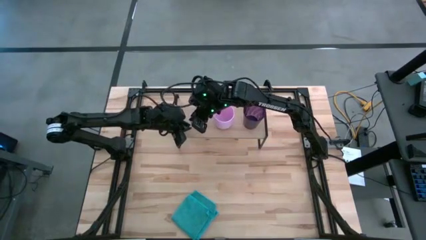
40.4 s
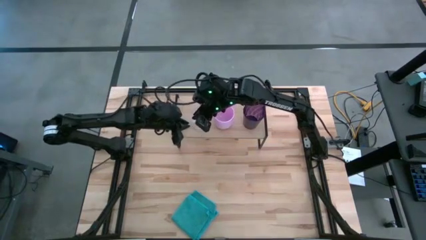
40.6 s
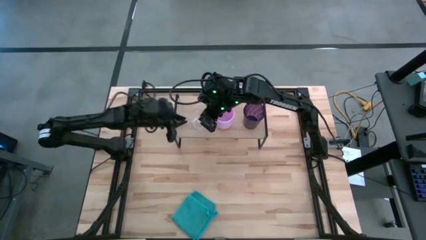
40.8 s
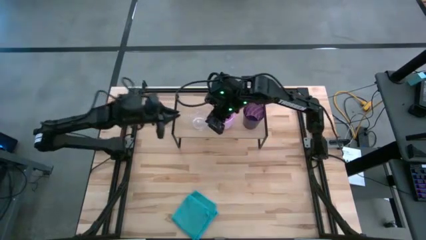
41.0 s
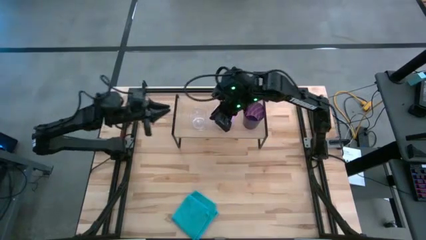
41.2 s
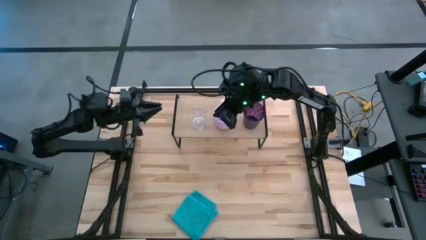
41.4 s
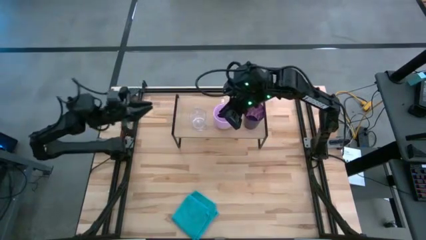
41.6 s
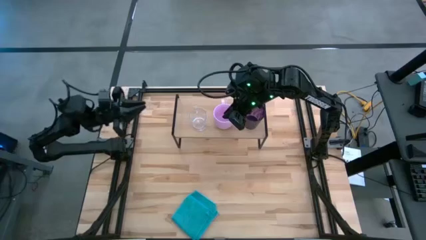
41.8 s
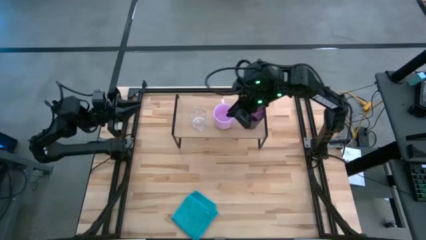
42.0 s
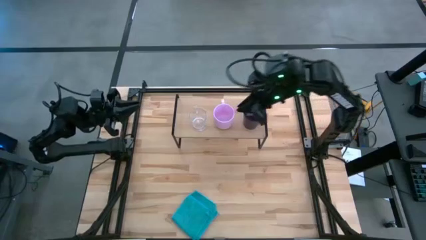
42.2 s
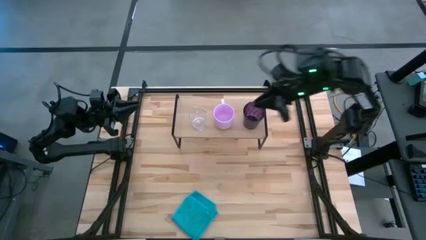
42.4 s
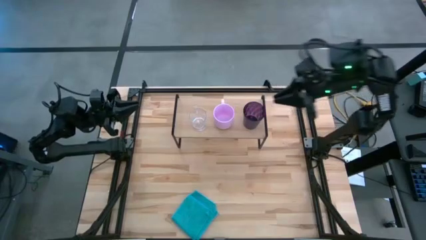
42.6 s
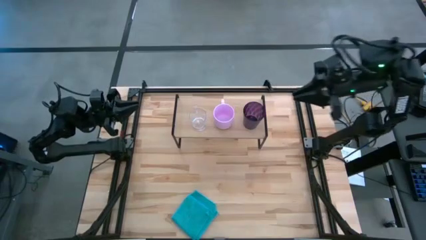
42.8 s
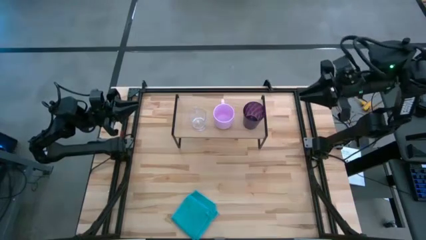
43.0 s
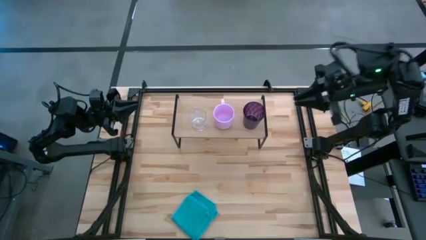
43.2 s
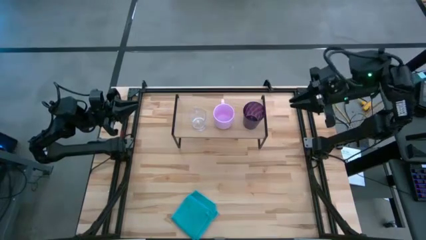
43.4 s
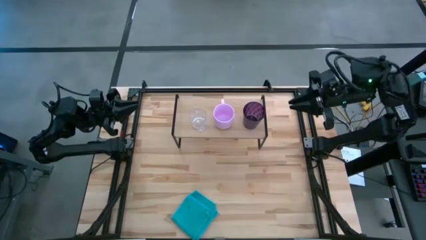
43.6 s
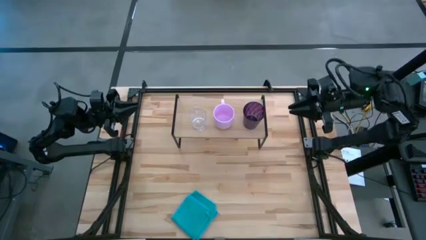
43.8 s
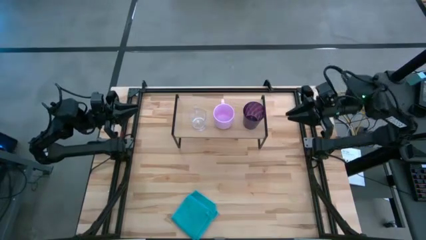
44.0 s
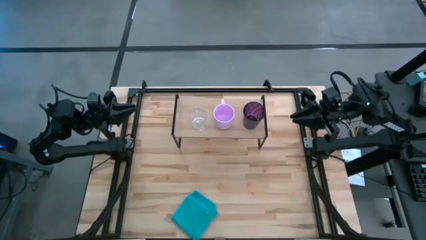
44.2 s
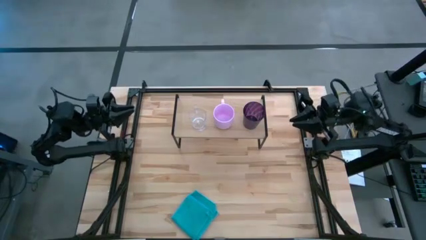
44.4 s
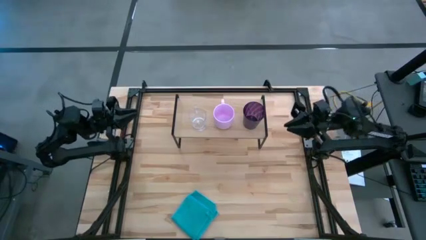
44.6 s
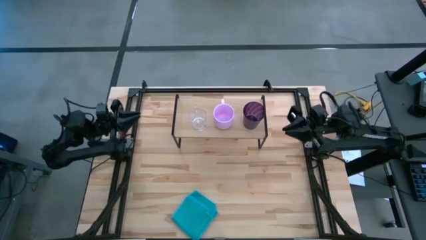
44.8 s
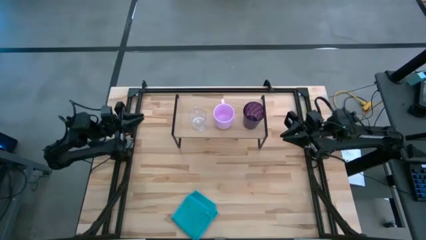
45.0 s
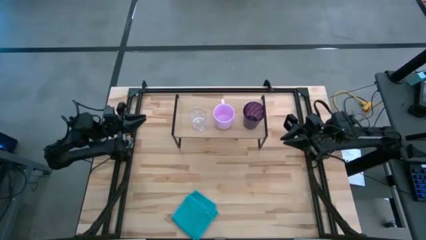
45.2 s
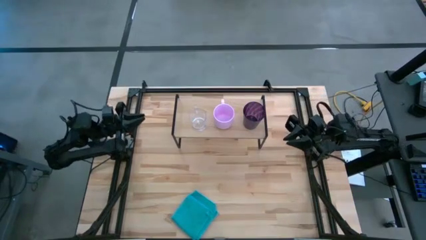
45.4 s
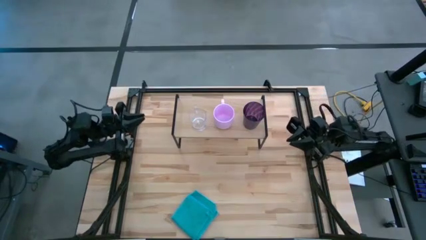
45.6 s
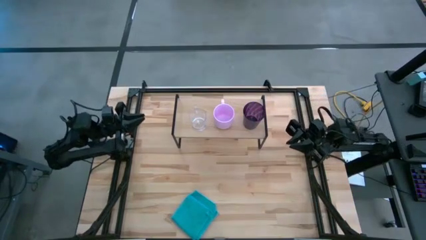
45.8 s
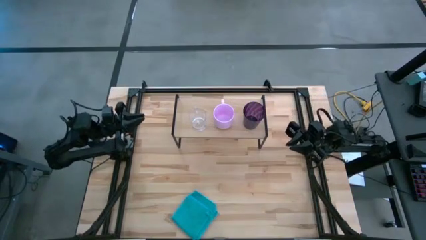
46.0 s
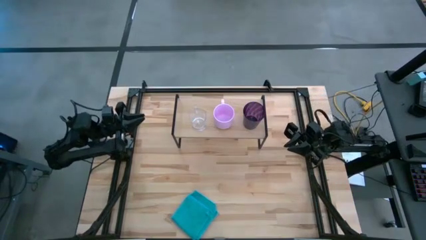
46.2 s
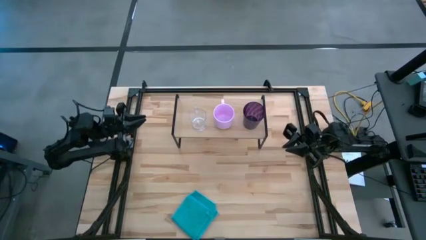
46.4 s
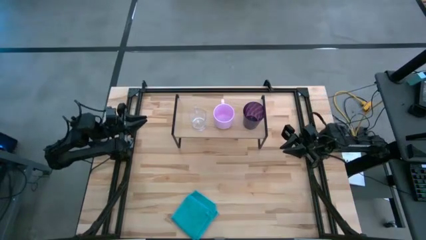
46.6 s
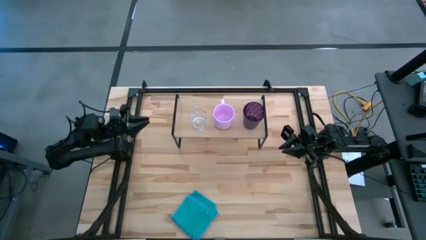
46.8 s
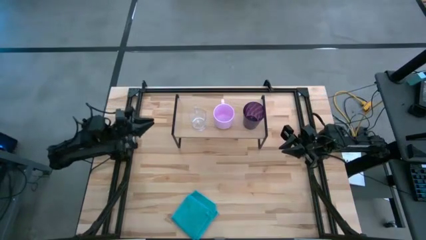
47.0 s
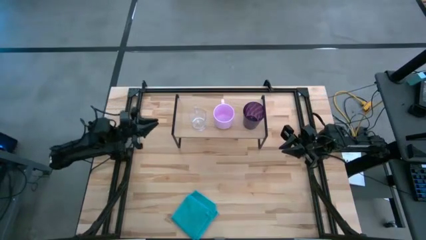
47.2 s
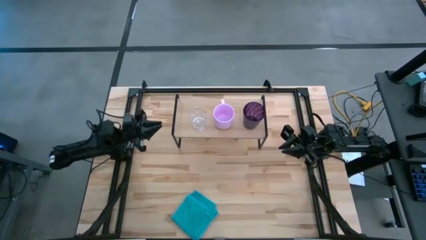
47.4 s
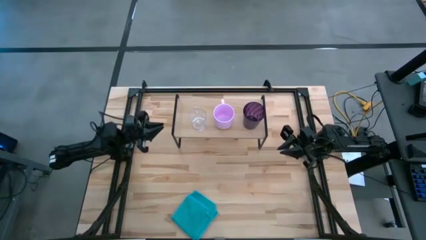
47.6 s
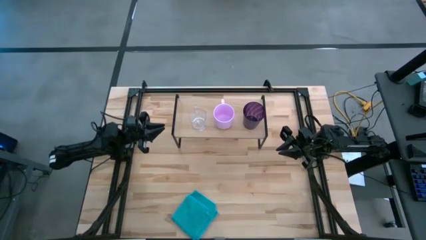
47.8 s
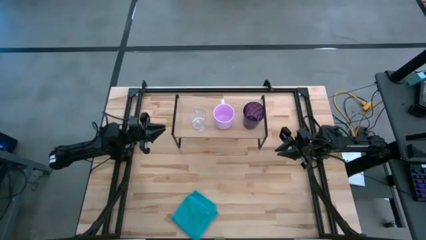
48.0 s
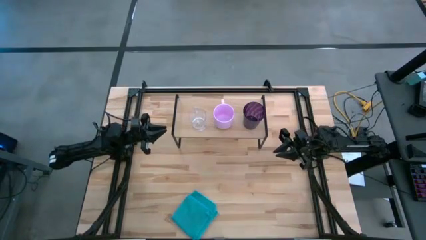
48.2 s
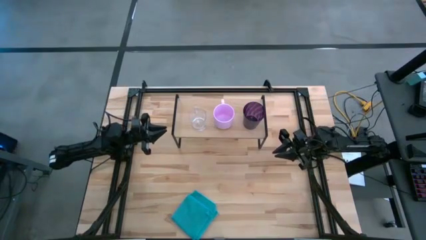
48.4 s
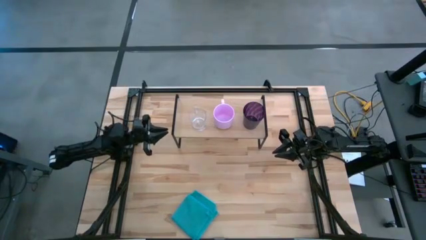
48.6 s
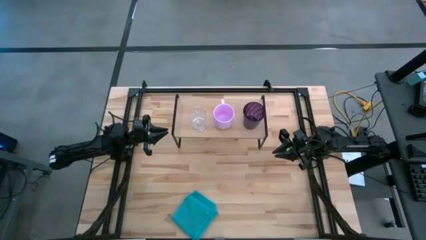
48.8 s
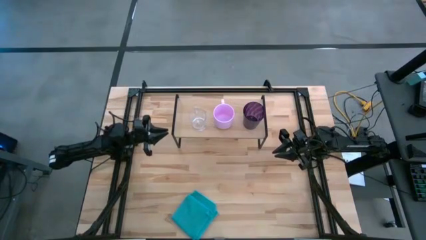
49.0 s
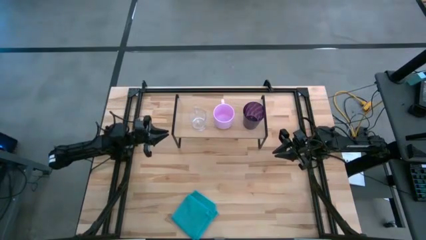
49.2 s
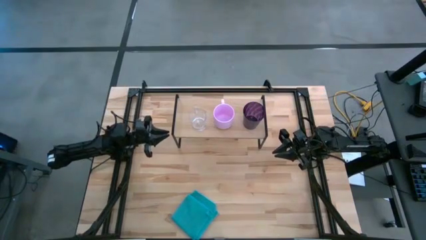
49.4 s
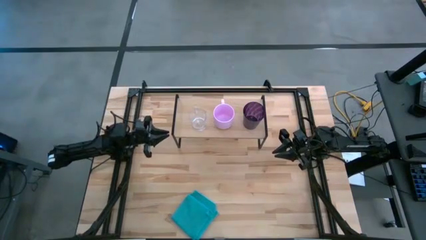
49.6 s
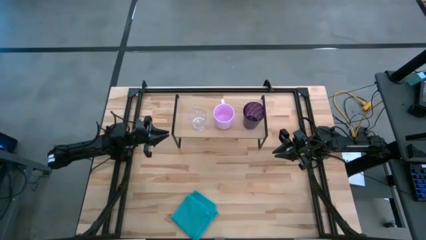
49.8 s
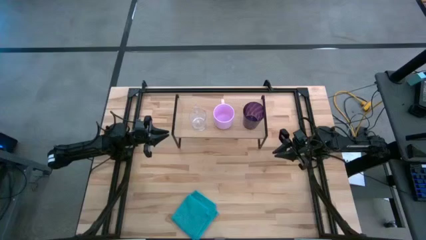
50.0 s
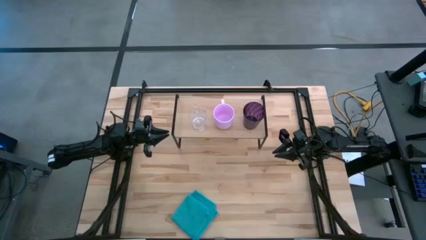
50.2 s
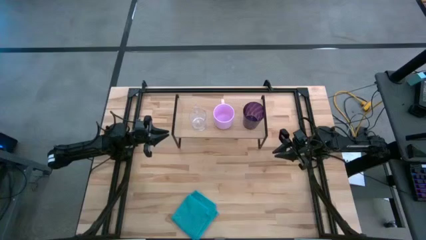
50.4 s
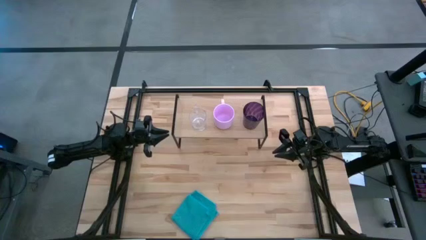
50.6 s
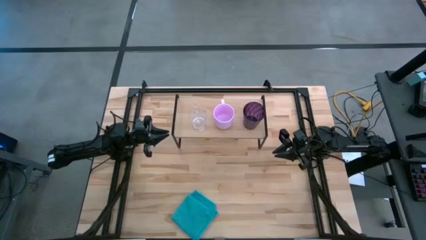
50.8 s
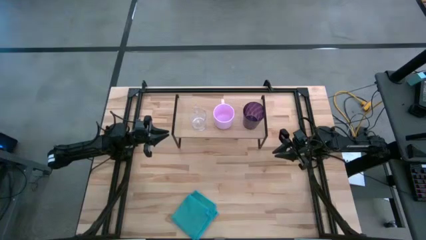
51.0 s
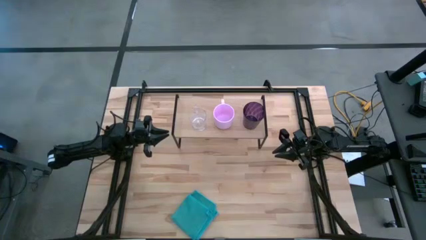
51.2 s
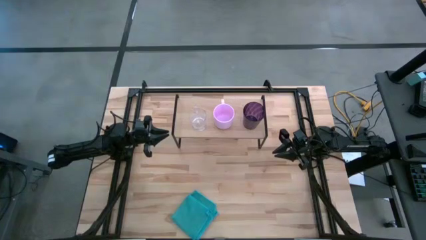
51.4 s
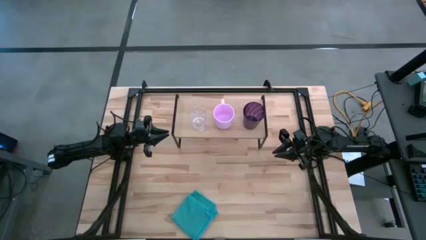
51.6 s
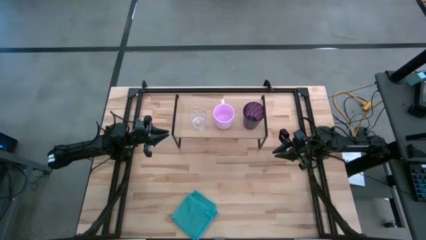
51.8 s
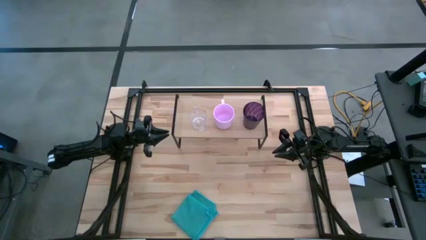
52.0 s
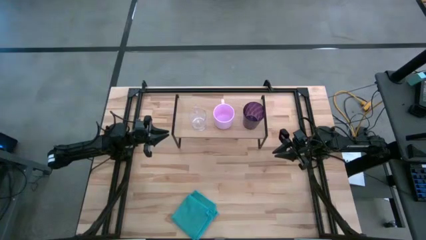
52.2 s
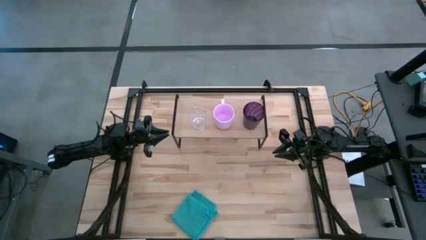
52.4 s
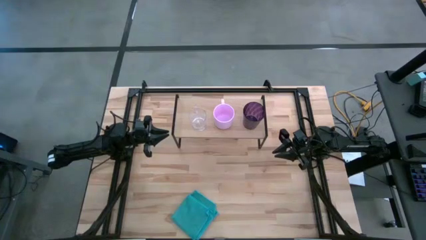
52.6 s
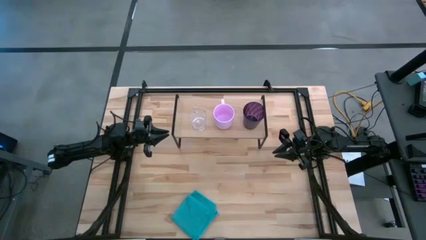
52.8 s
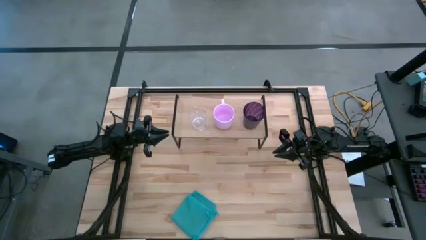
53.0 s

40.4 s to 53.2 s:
Task: Stack small to large cups/mugs on shelf
Return to Home Position
